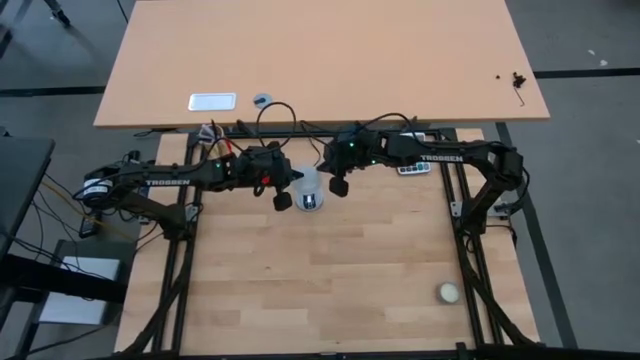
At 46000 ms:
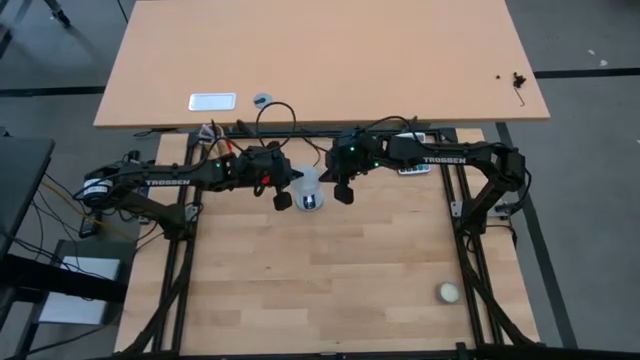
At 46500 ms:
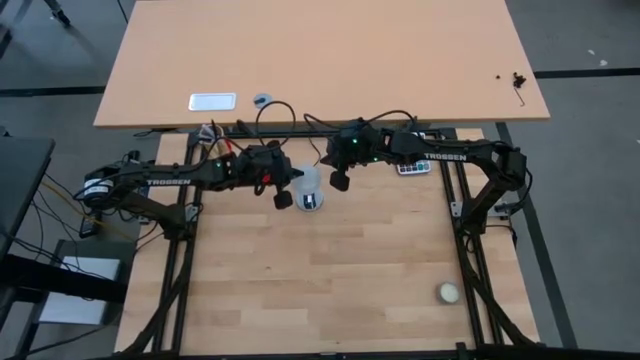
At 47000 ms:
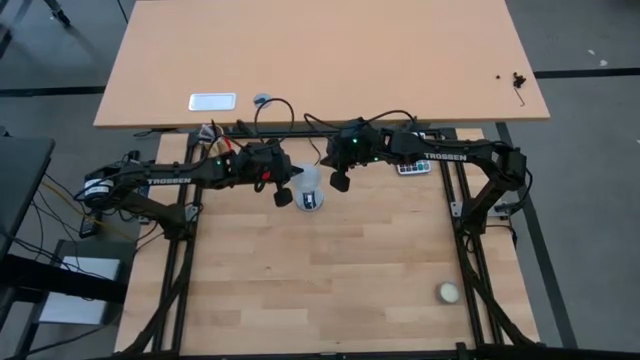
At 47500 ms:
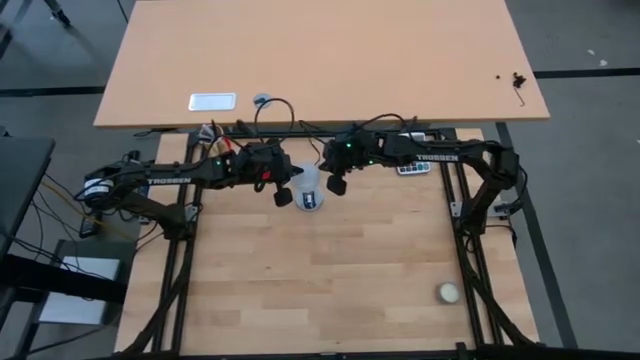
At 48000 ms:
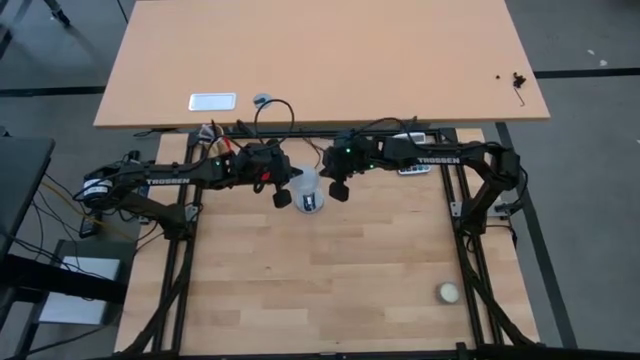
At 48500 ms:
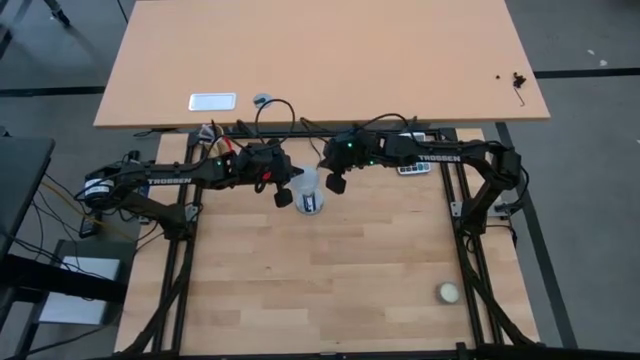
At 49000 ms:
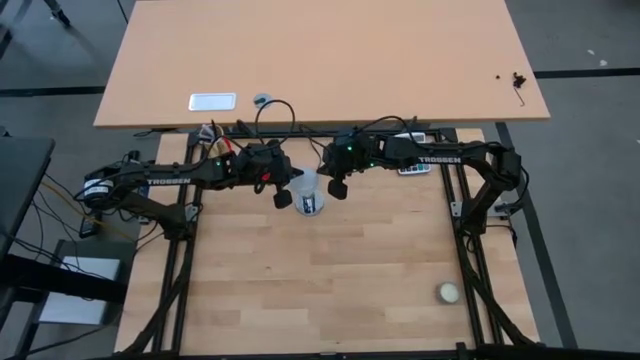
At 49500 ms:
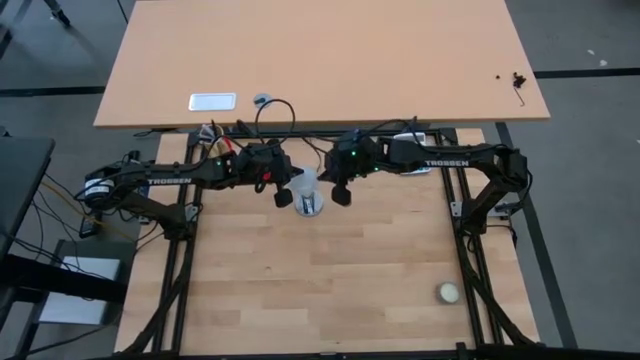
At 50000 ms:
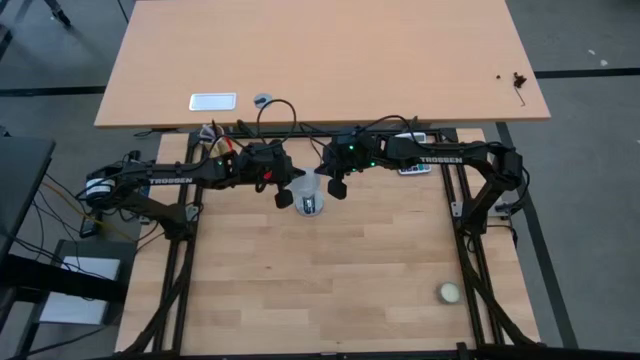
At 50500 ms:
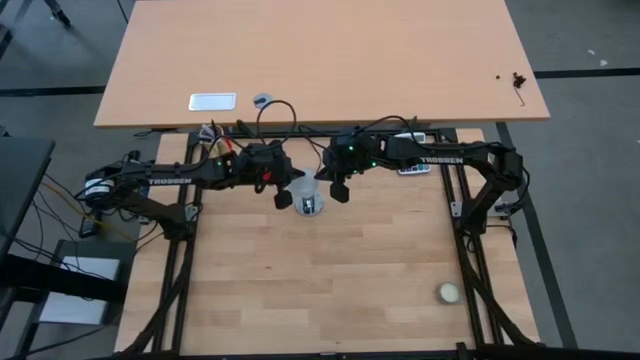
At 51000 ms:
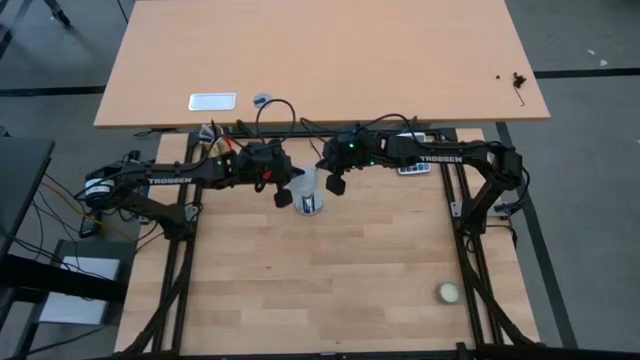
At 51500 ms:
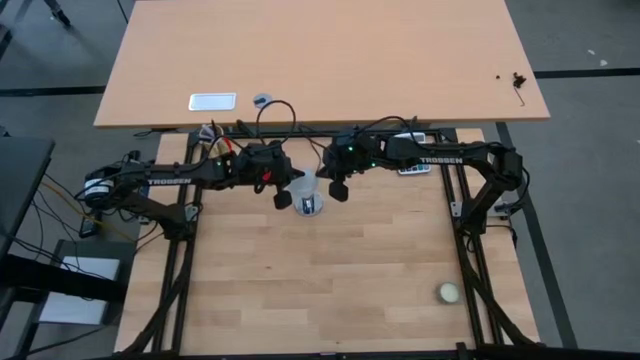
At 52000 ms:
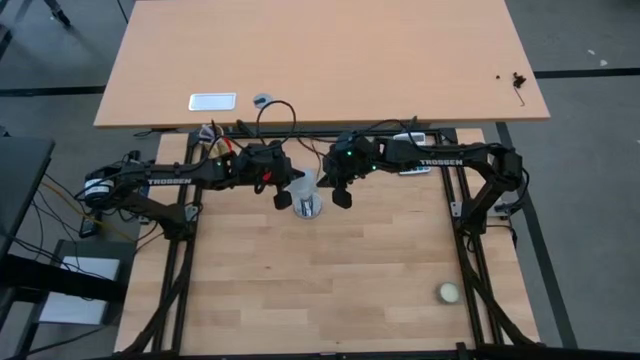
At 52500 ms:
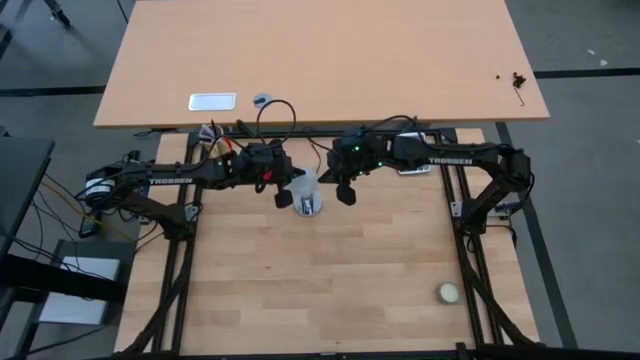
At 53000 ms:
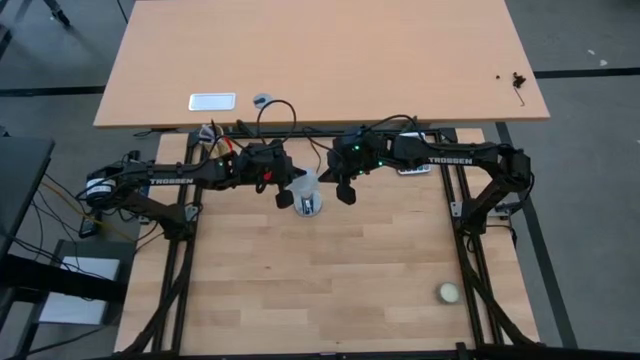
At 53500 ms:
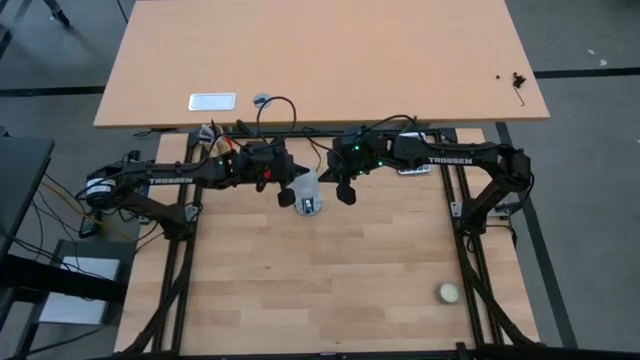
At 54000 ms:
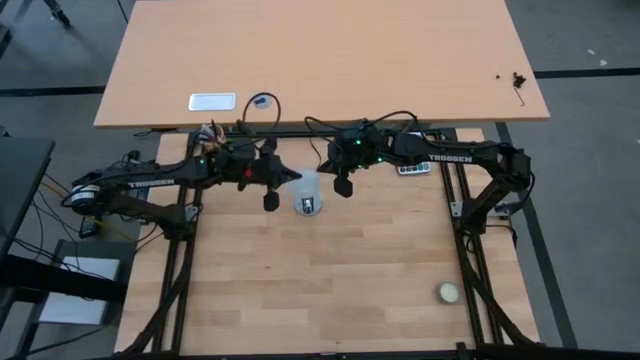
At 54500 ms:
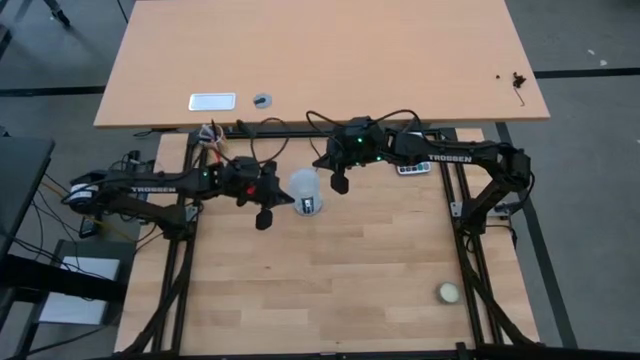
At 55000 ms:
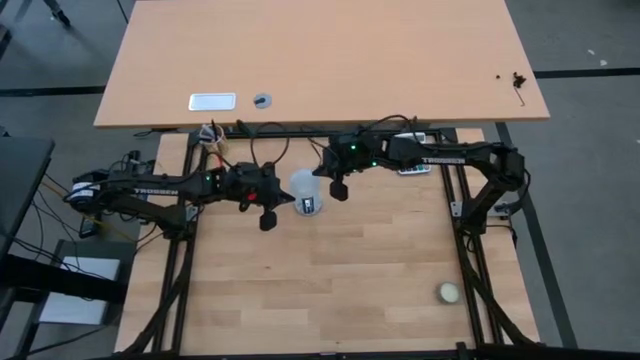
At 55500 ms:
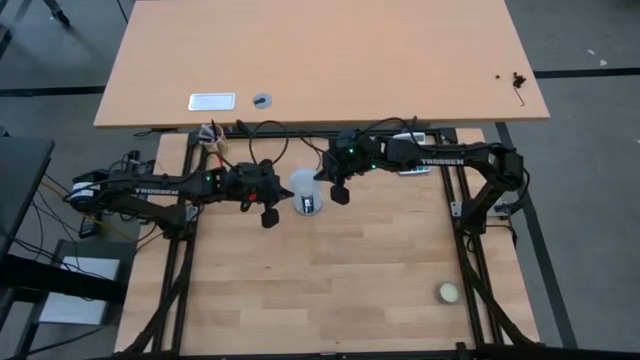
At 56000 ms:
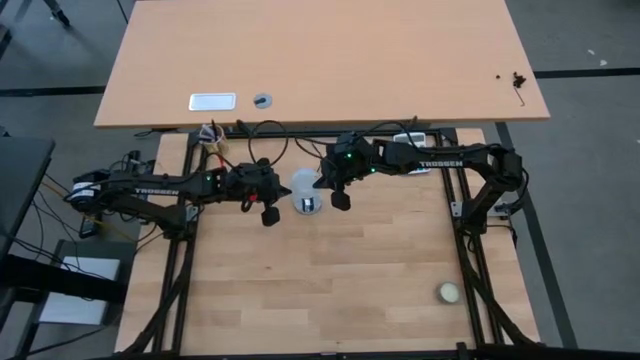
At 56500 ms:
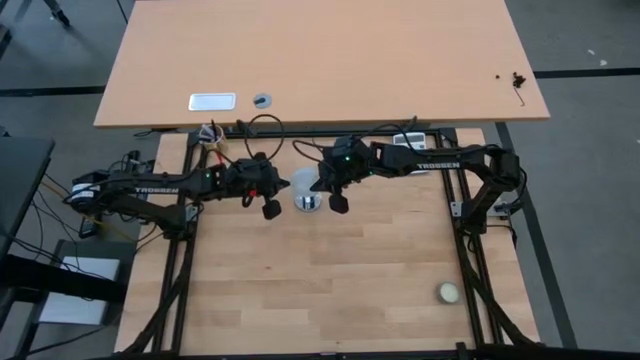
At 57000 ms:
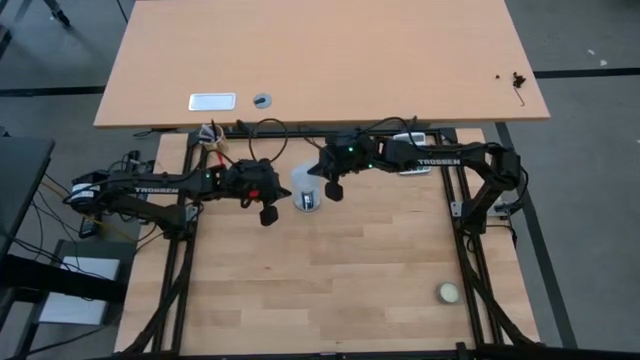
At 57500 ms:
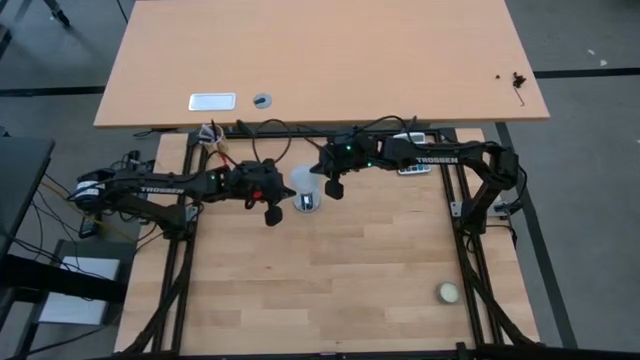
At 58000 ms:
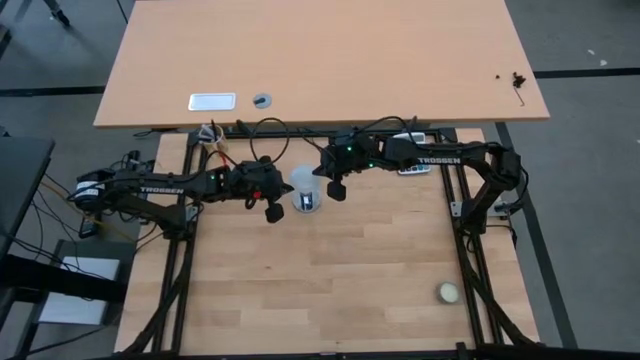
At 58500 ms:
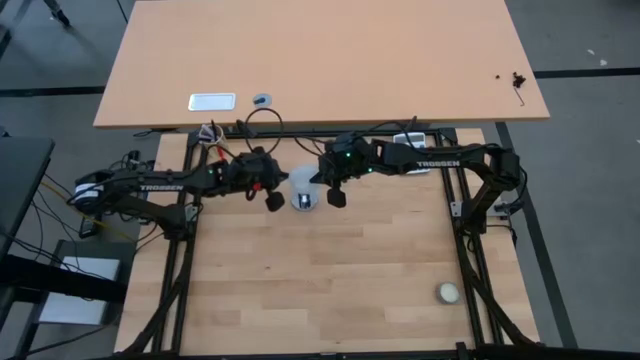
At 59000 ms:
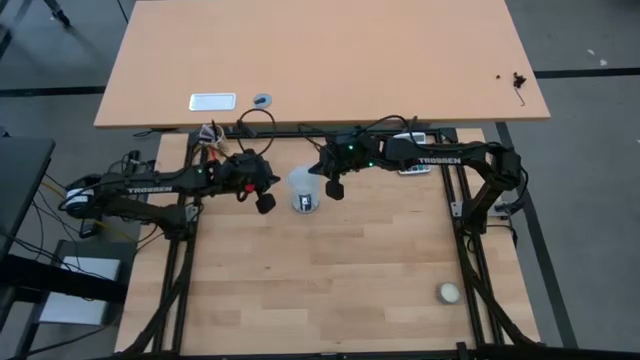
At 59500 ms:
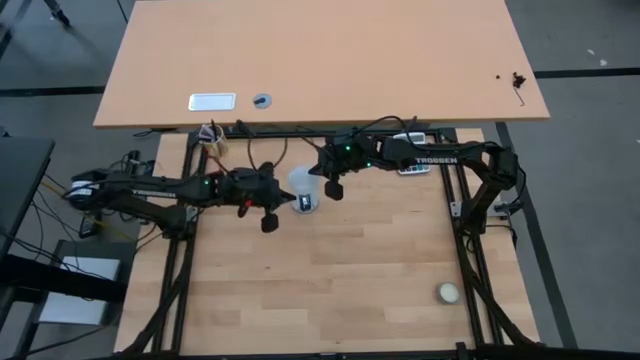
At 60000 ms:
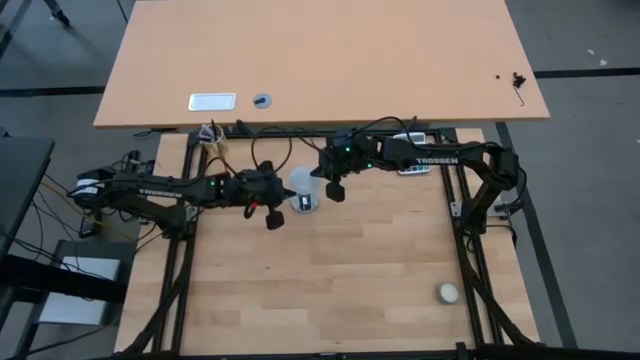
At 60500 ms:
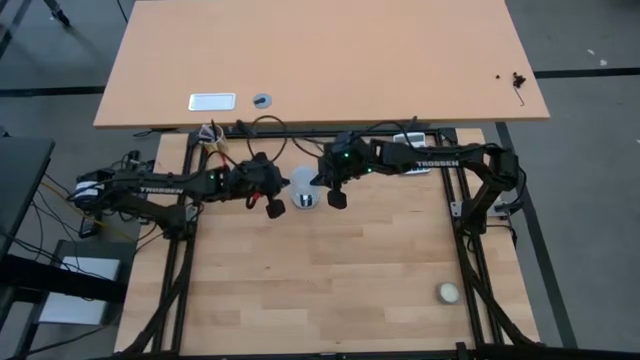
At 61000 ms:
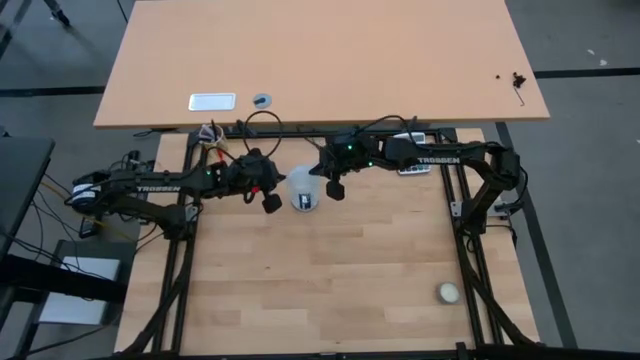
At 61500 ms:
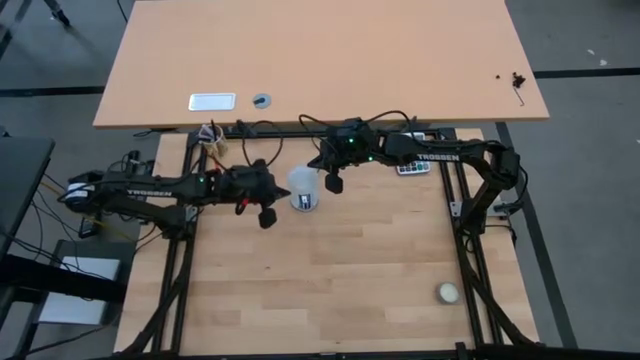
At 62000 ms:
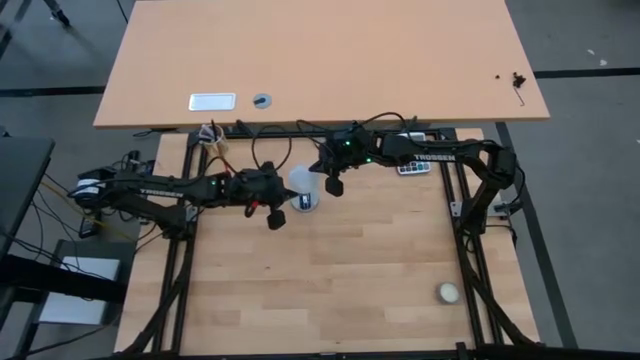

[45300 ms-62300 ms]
Task: Screw lightbulb
Insert the white lightbulb into the silver lamp

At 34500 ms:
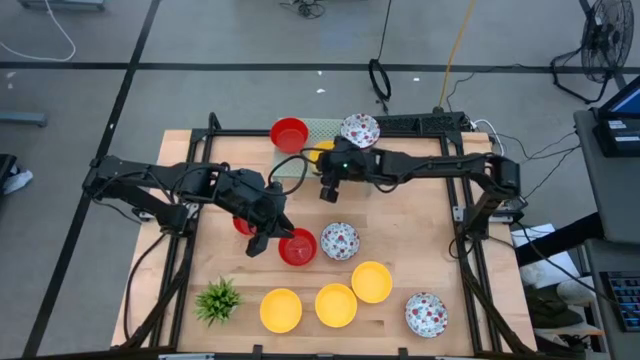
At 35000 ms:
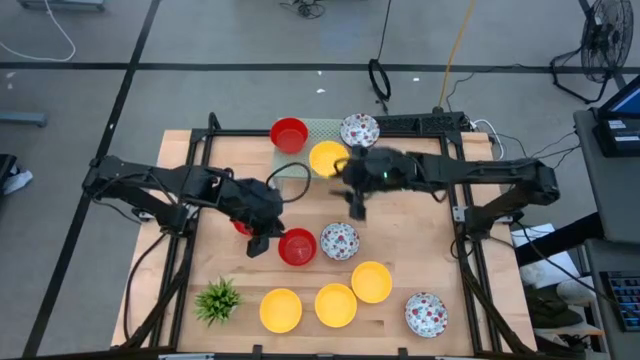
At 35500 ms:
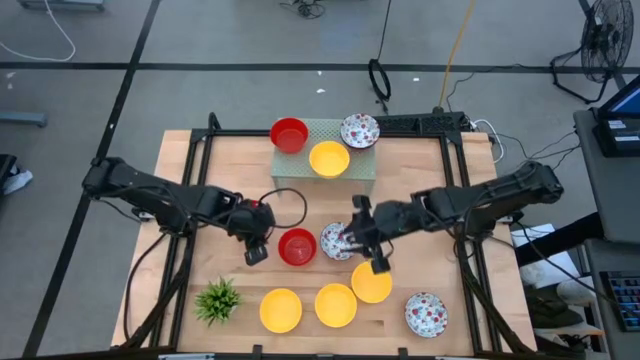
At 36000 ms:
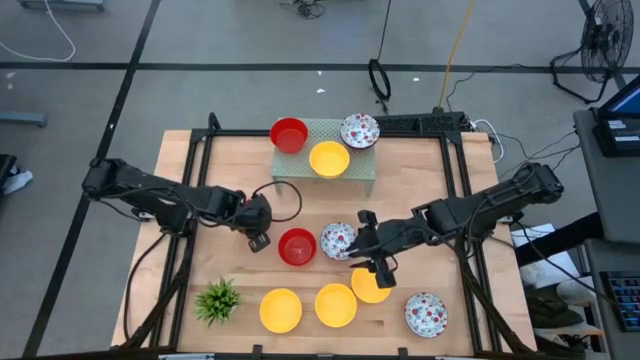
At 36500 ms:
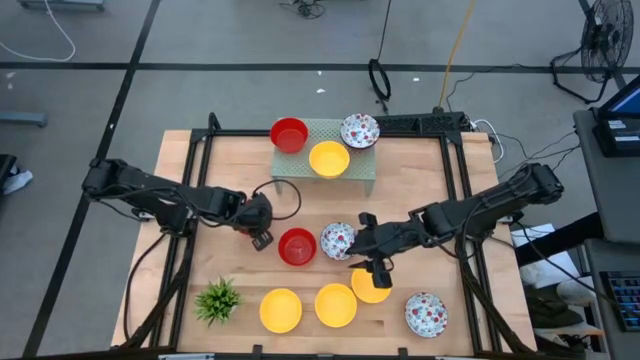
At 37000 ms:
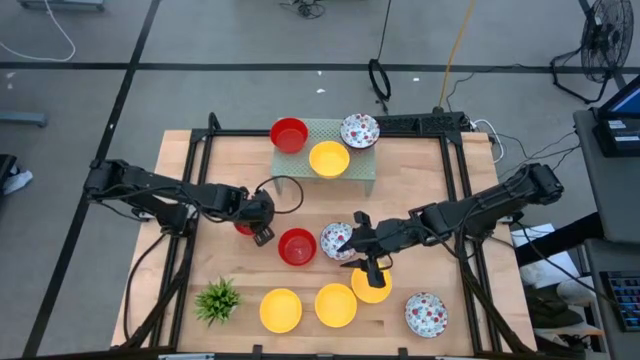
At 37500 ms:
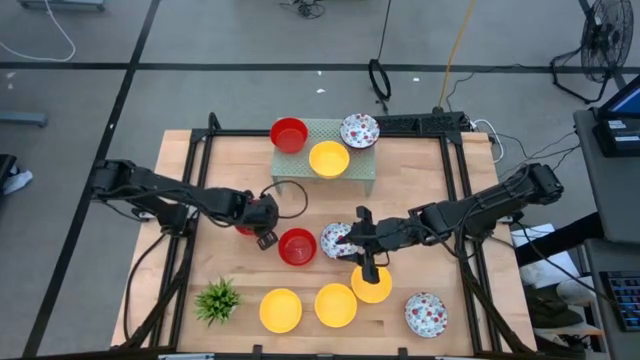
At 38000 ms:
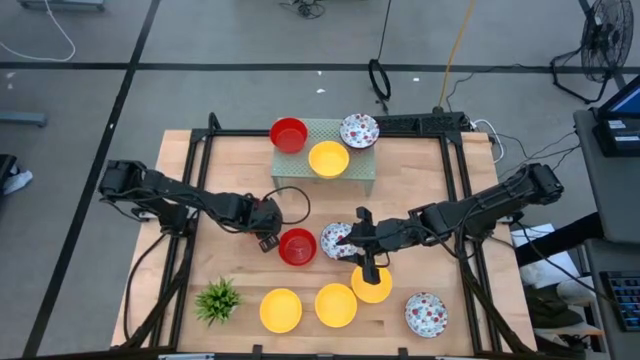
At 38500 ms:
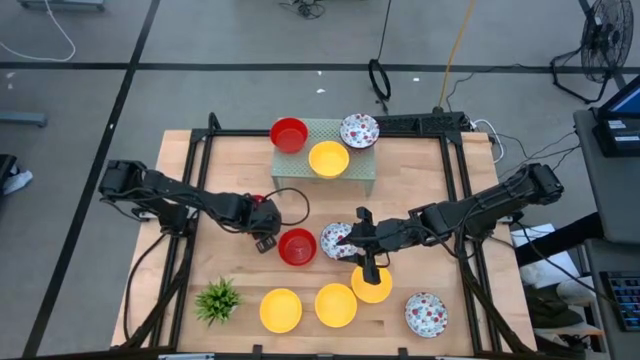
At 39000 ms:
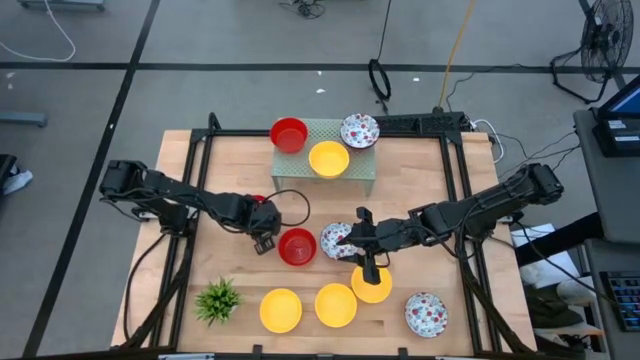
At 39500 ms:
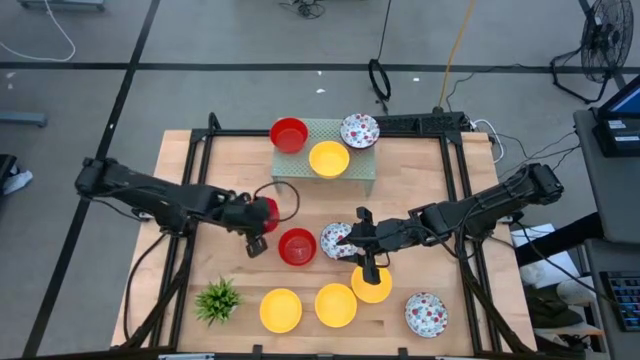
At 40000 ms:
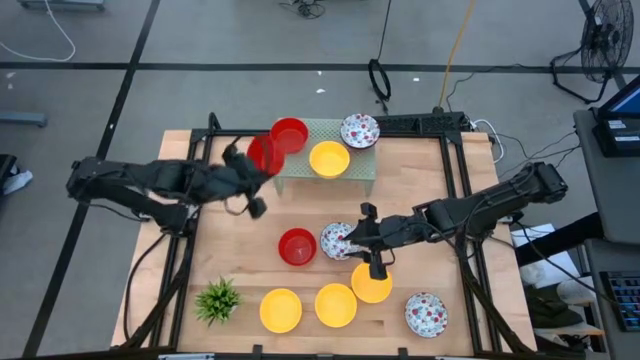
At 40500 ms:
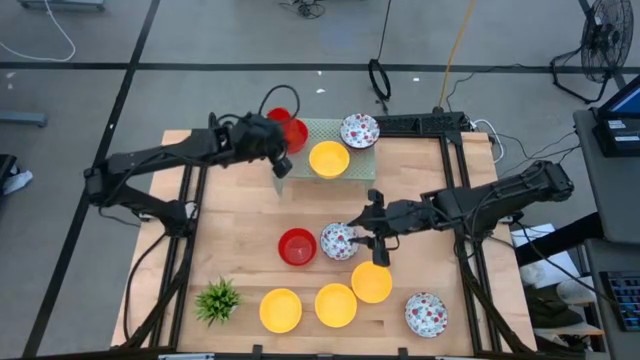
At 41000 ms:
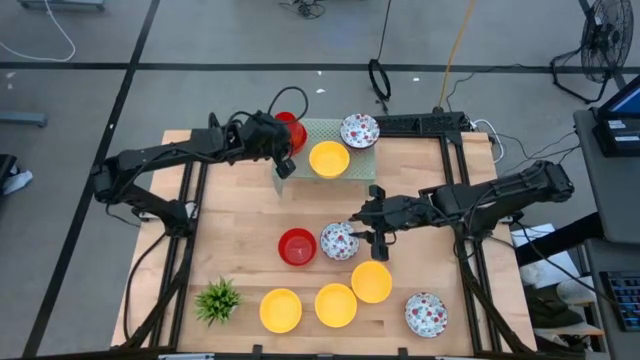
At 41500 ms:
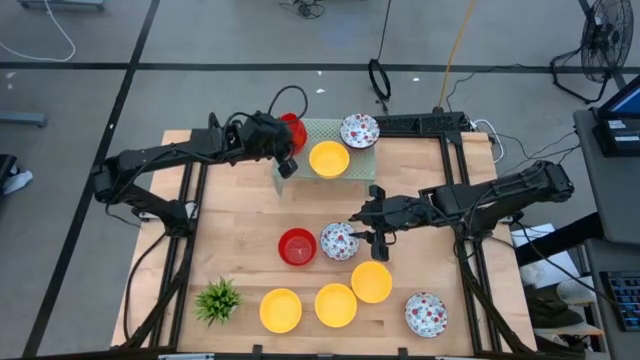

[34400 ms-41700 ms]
Task: Pick & Place Mini bowls
Stack the red bowl on top of the red bowl on the shelf
